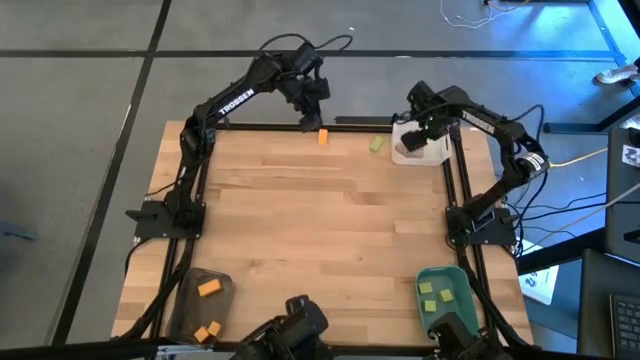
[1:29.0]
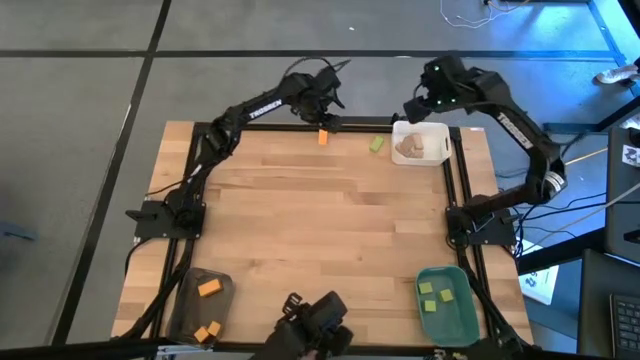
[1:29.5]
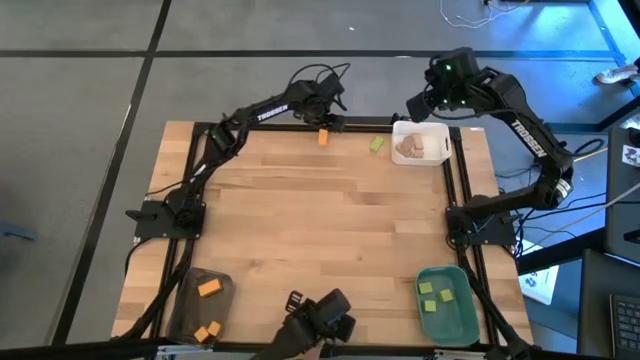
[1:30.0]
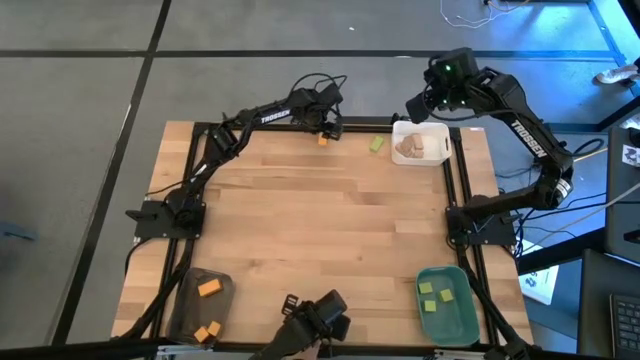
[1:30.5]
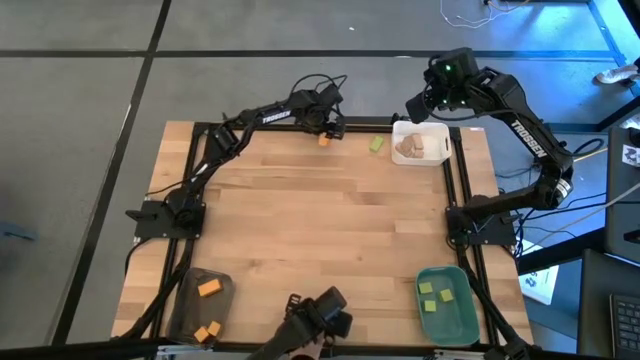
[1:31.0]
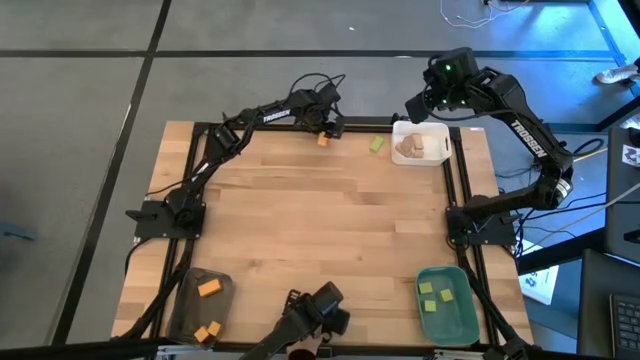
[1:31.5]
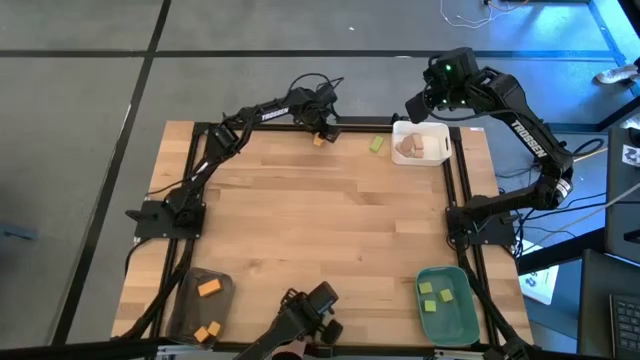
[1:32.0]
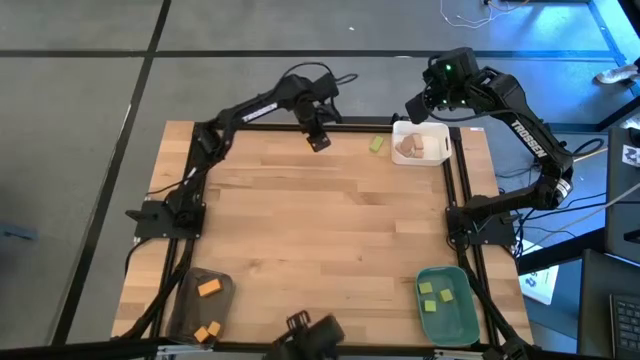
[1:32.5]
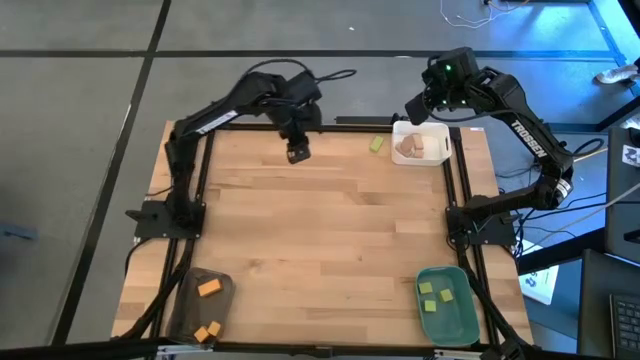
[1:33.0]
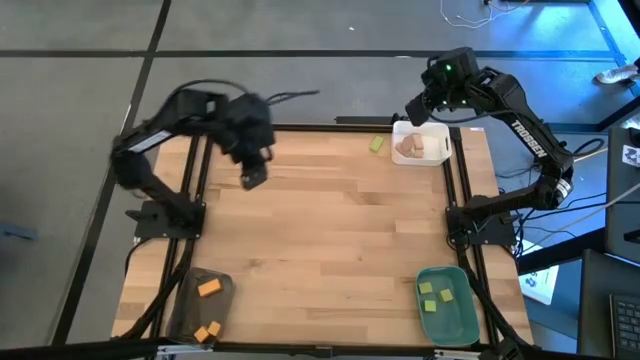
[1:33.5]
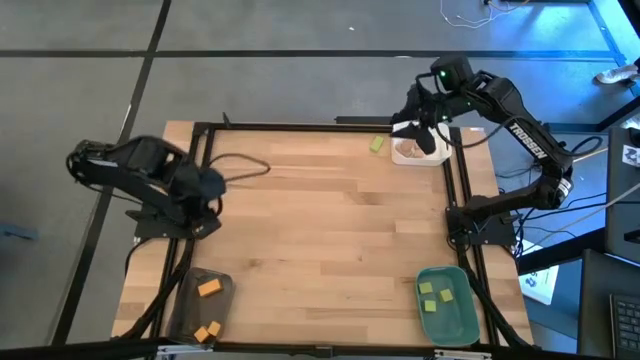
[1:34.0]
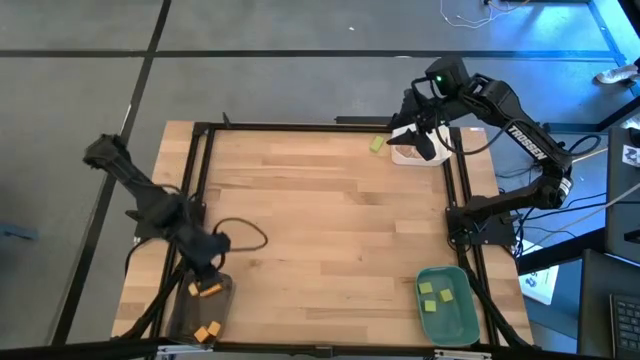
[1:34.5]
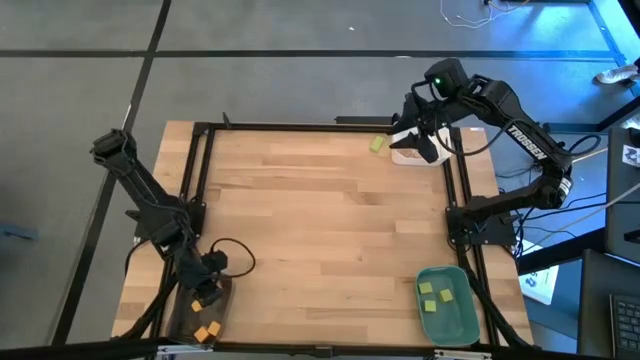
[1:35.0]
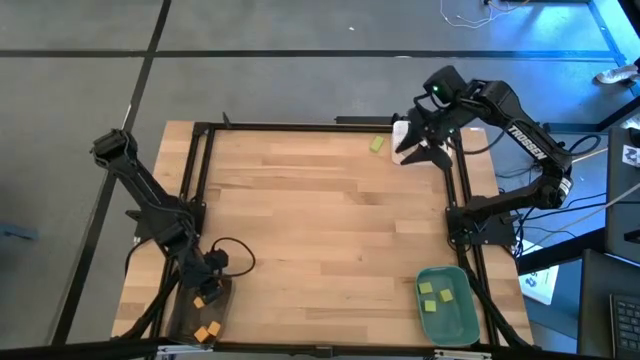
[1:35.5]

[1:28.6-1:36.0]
Task: Sort & place blocks by color
Put the yellow block into the black bin

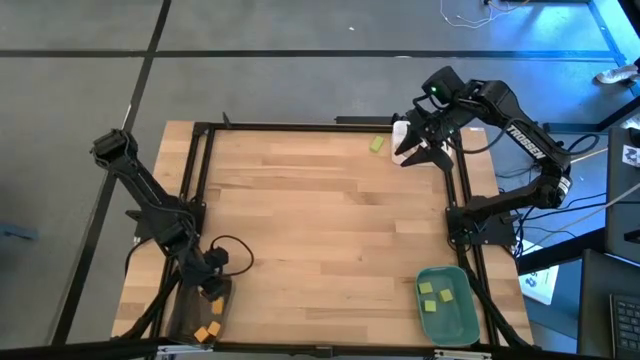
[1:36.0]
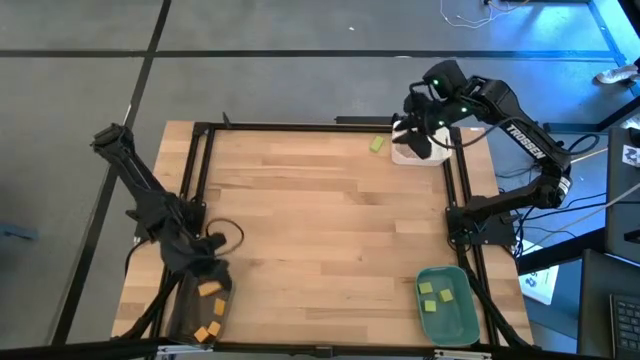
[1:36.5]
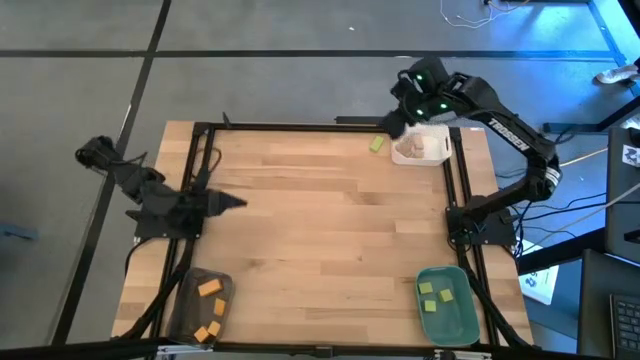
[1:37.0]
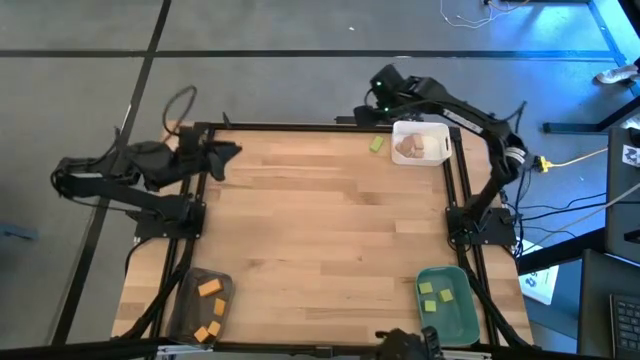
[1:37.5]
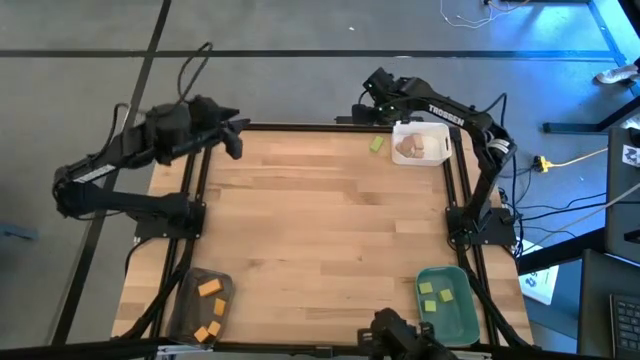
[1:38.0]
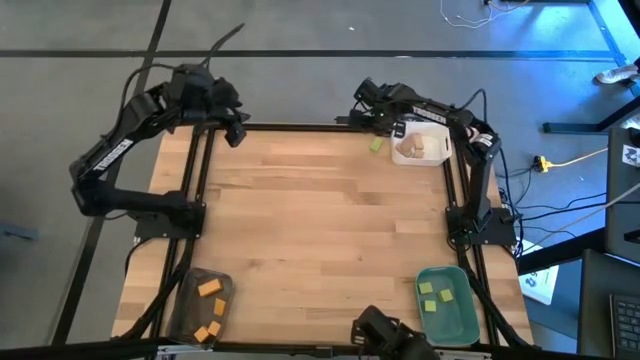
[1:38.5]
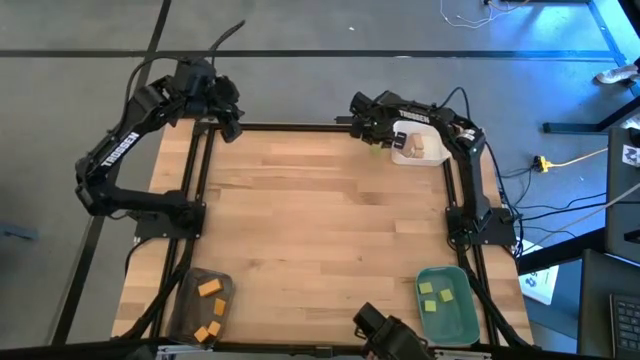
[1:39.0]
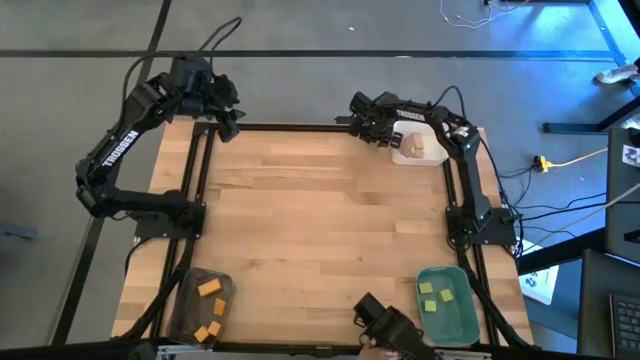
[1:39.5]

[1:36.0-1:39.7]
Put the green block into the blue bin

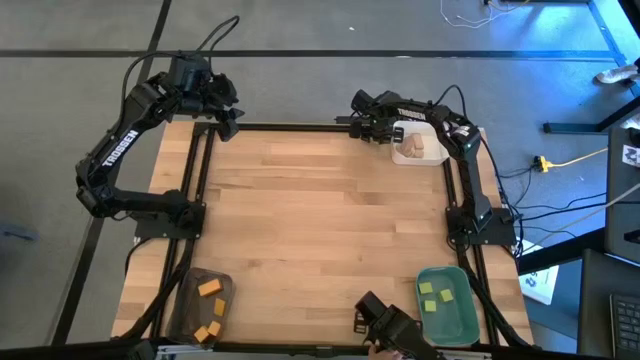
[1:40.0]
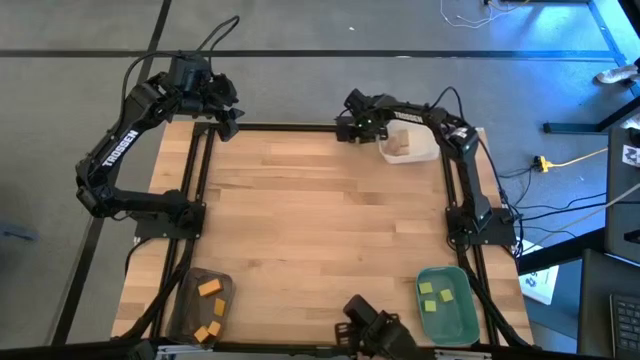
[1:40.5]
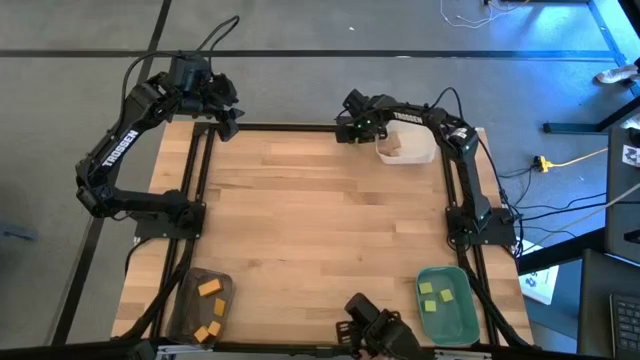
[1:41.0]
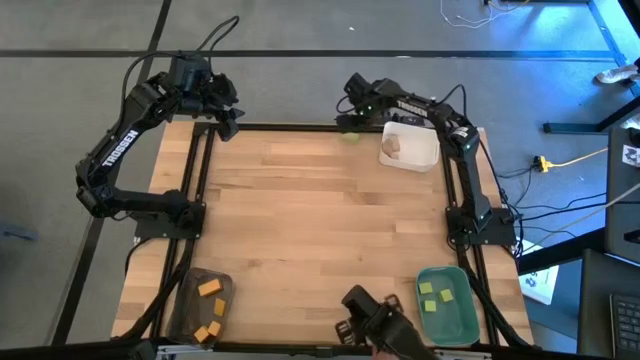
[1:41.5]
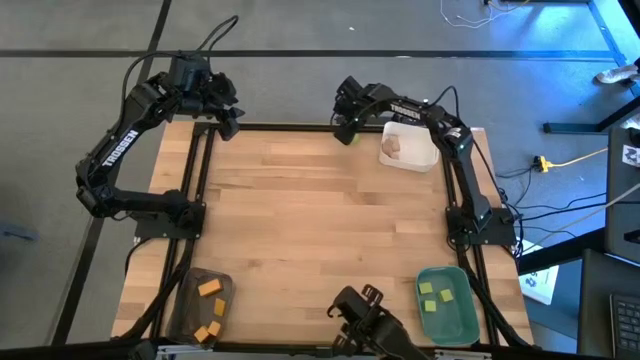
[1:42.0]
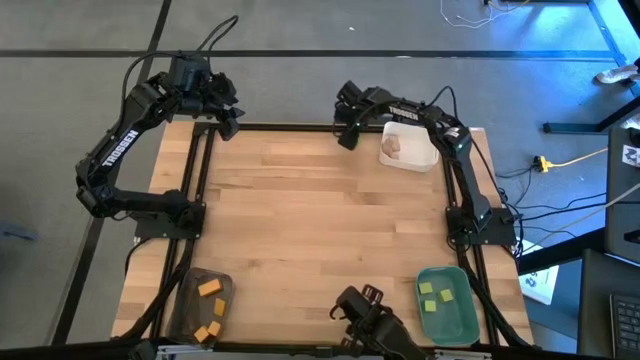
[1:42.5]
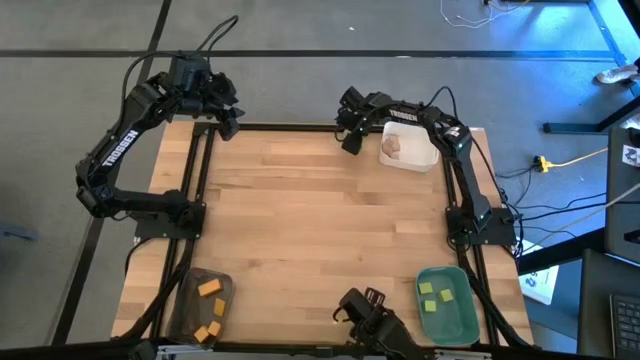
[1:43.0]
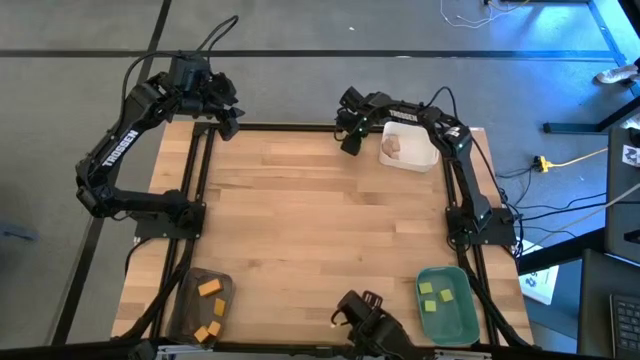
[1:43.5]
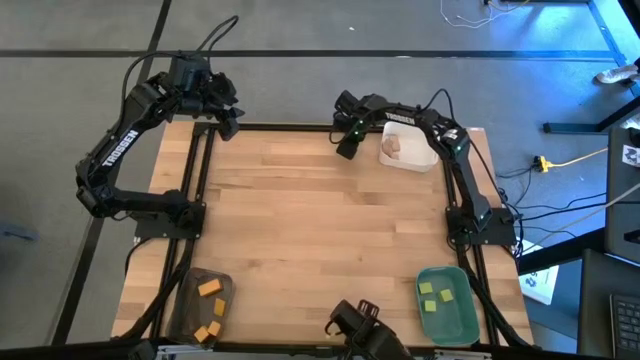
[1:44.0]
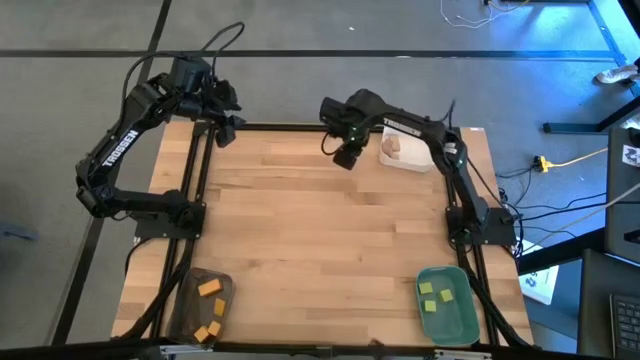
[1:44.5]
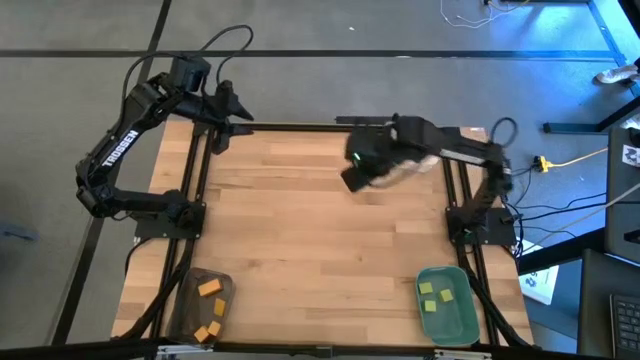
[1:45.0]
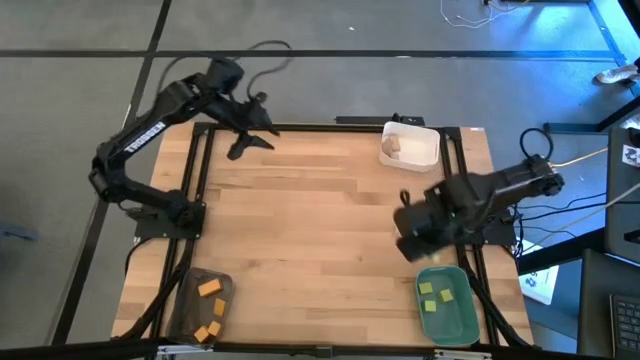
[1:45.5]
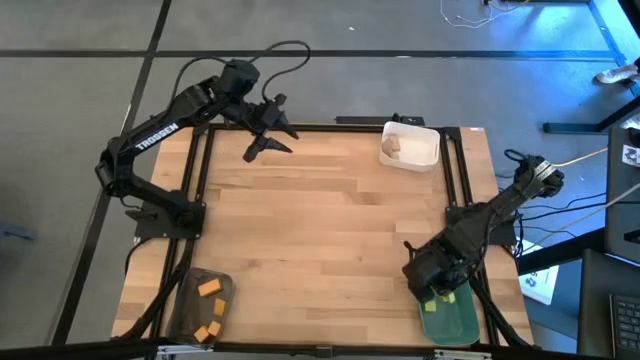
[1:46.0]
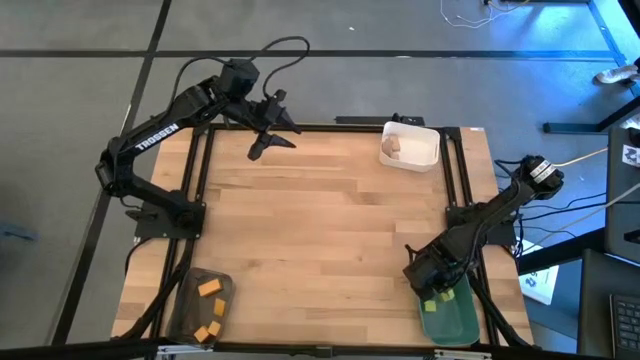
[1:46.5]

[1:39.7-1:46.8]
Put the green block into the blue bin

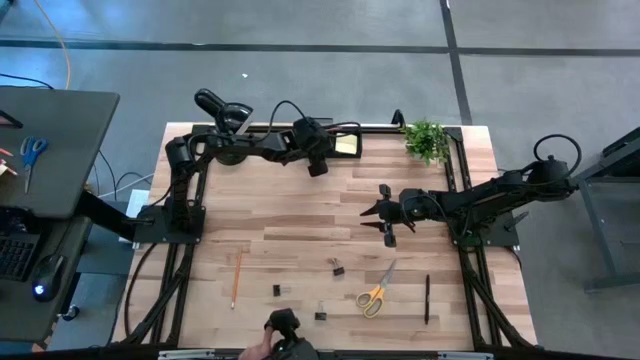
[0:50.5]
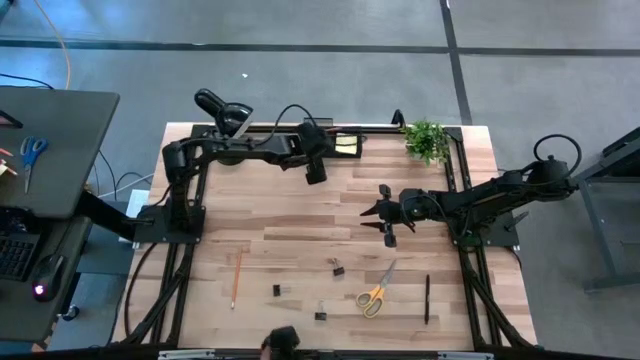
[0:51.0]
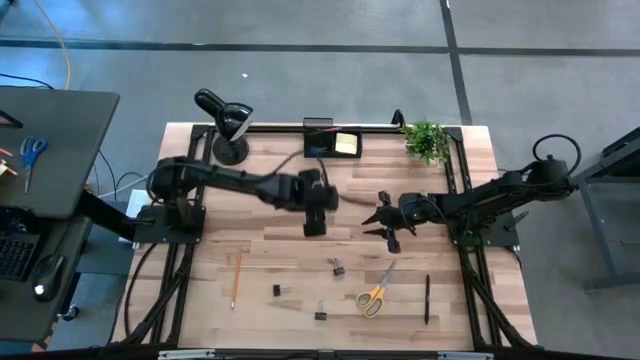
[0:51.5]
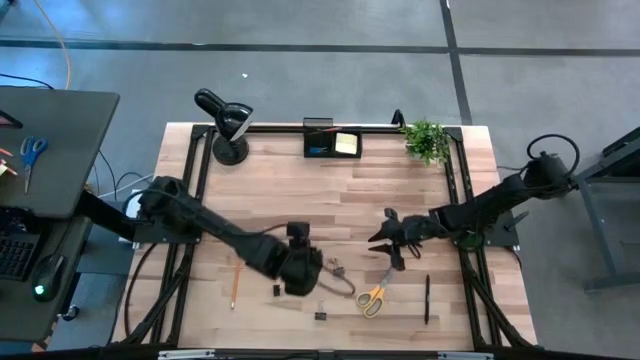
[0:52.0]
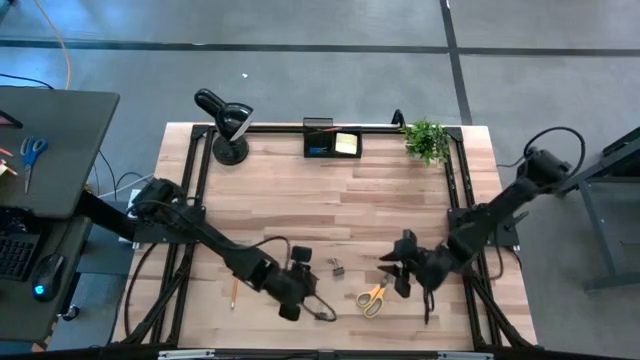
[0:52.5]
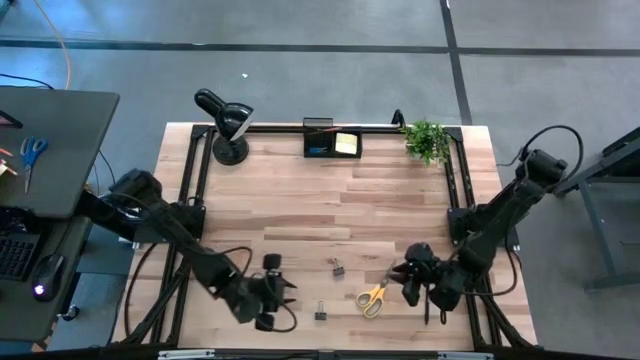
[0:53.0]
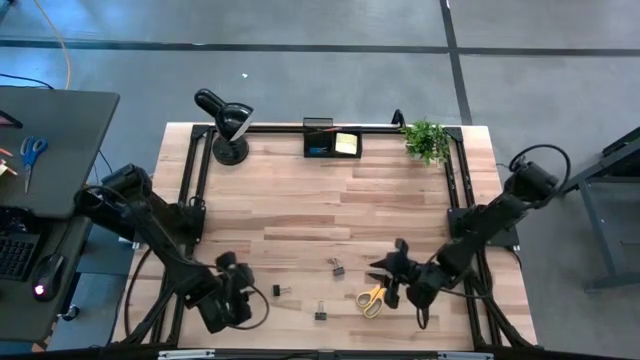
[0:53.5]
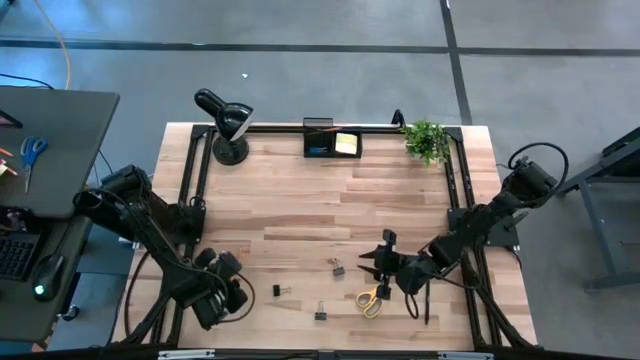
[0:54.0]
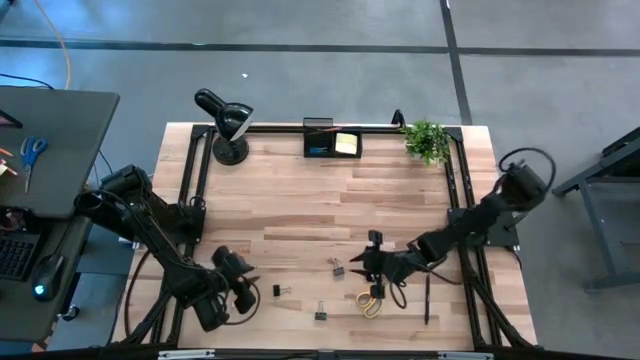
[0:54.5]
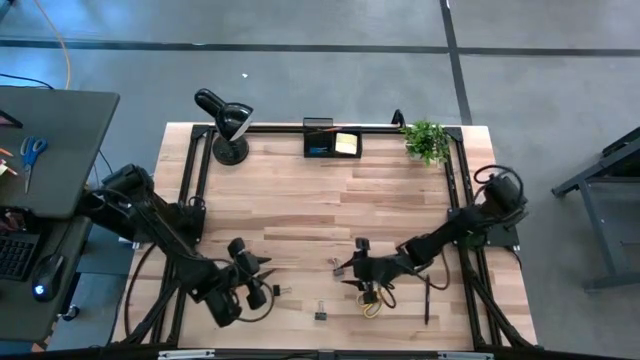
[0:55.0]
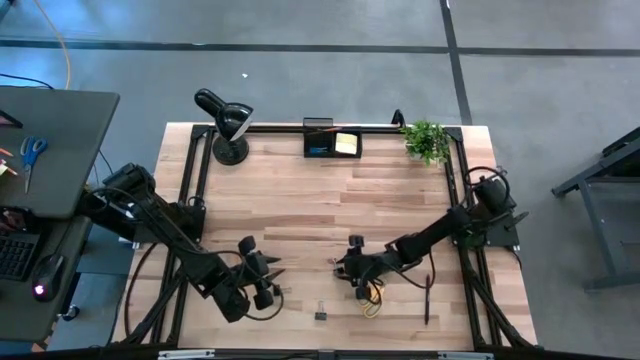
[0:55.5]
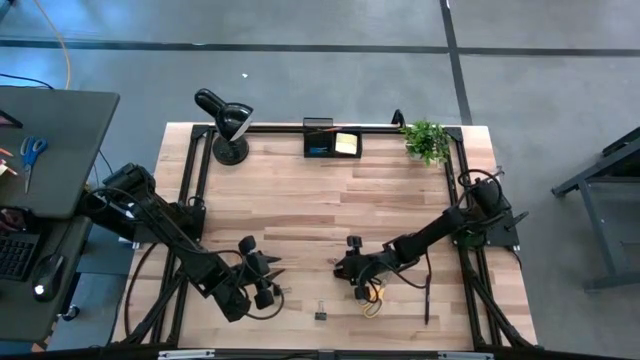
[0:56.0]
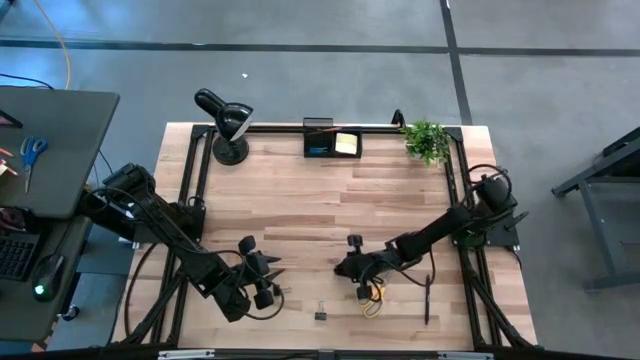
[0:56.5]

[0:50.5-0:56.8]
Task: Pick and place office supplies into organizer
Put the black binder clip into the black desk organizer
